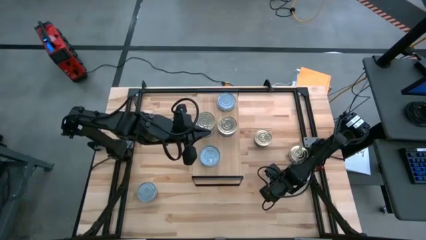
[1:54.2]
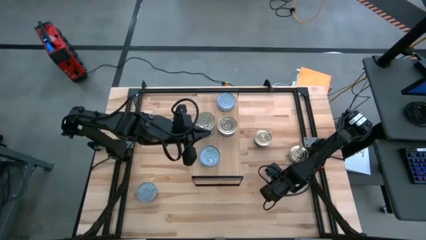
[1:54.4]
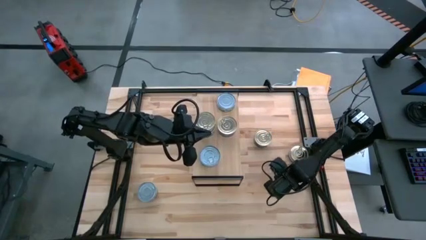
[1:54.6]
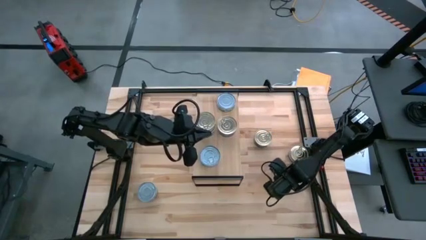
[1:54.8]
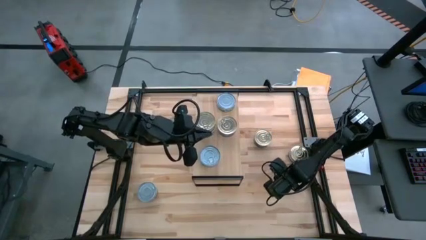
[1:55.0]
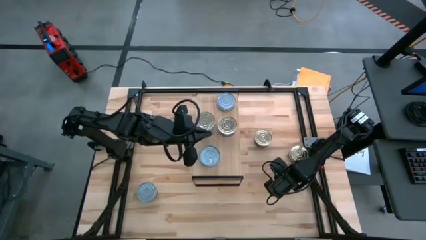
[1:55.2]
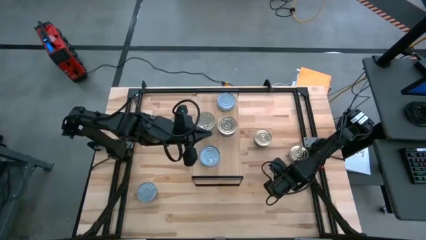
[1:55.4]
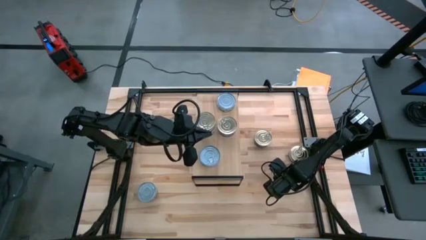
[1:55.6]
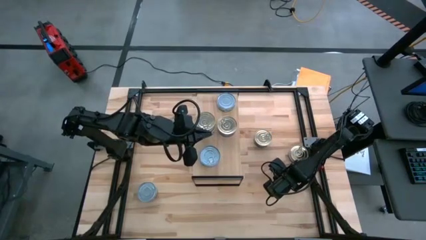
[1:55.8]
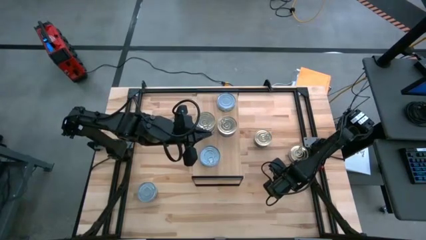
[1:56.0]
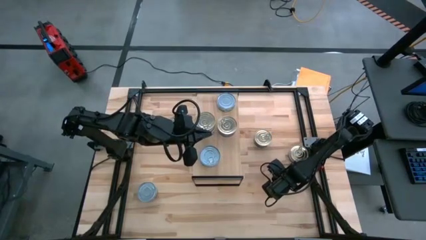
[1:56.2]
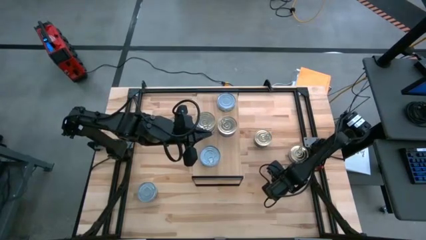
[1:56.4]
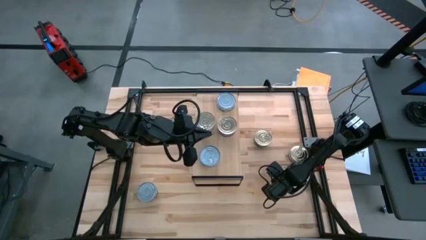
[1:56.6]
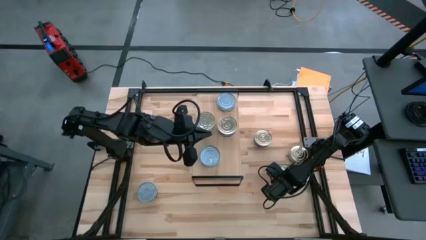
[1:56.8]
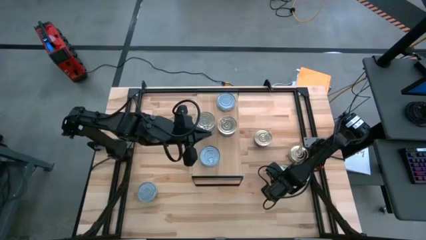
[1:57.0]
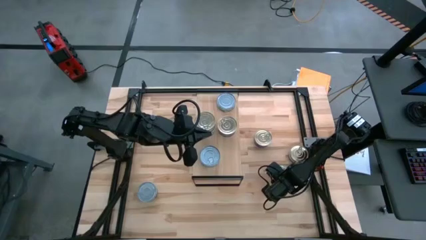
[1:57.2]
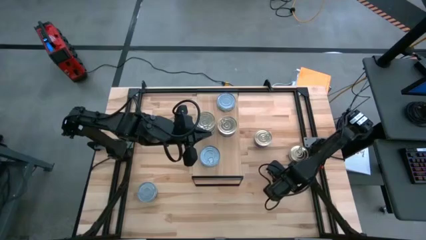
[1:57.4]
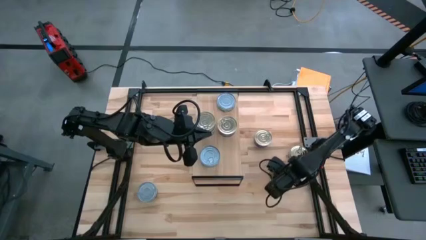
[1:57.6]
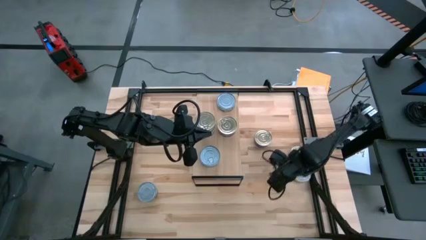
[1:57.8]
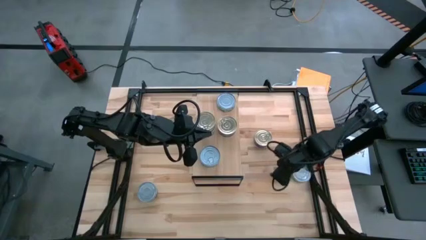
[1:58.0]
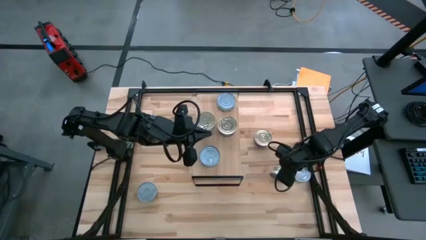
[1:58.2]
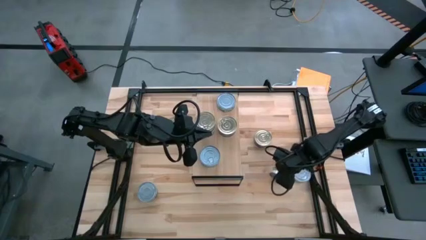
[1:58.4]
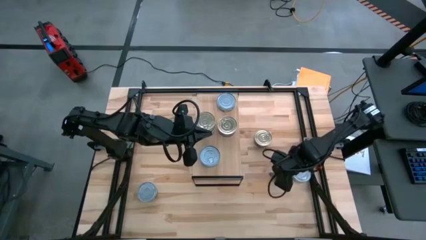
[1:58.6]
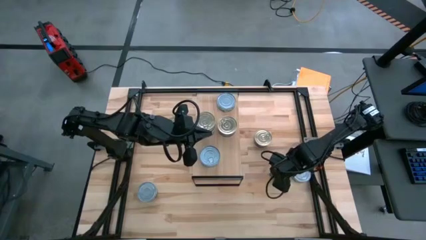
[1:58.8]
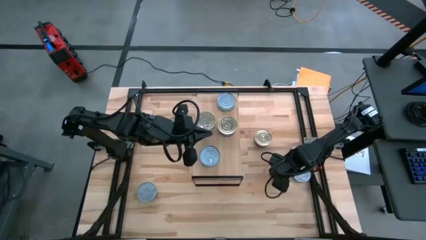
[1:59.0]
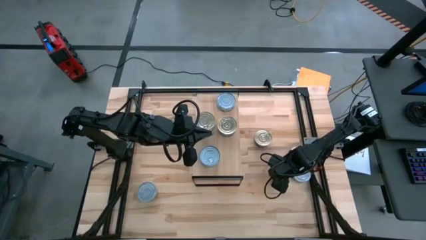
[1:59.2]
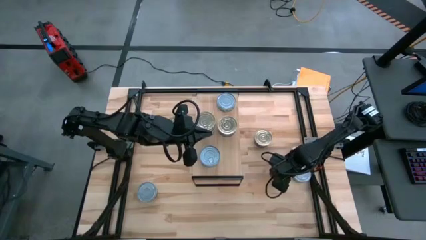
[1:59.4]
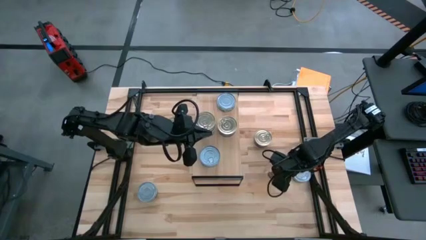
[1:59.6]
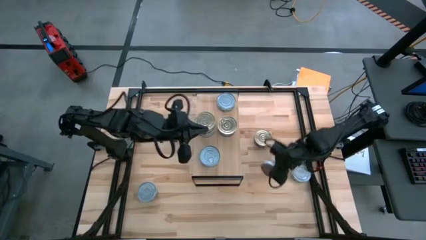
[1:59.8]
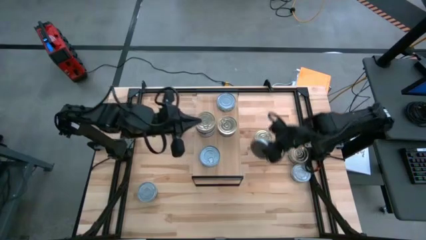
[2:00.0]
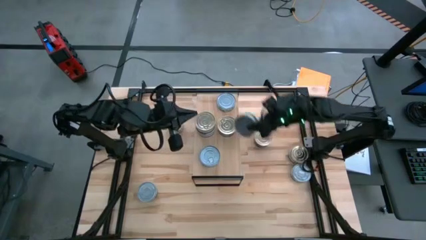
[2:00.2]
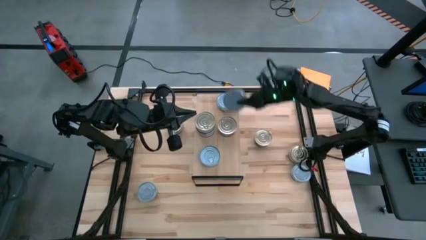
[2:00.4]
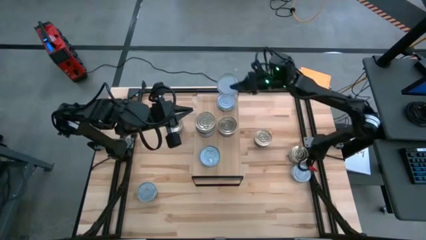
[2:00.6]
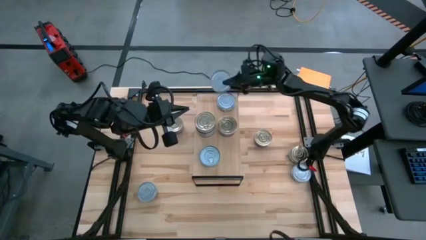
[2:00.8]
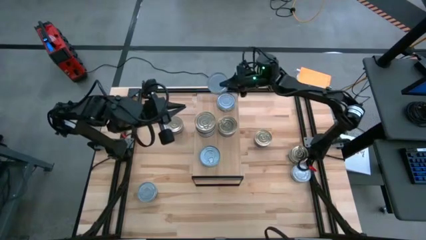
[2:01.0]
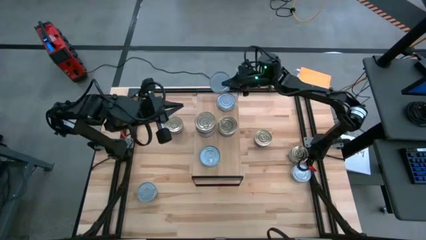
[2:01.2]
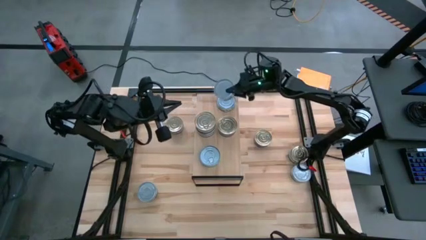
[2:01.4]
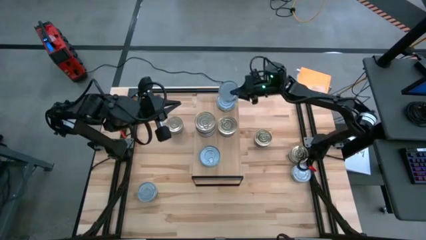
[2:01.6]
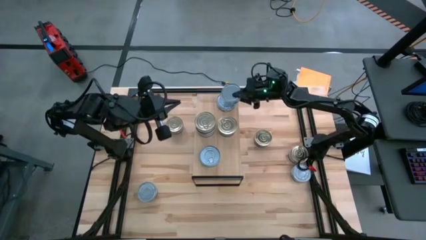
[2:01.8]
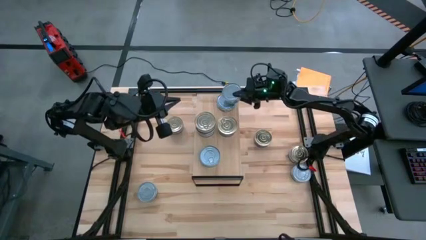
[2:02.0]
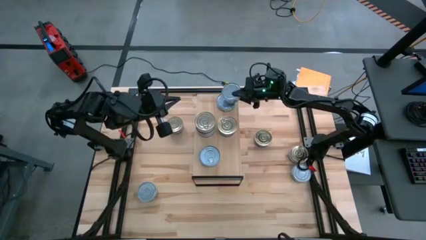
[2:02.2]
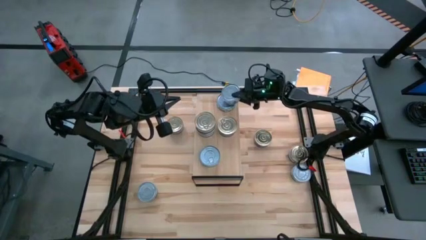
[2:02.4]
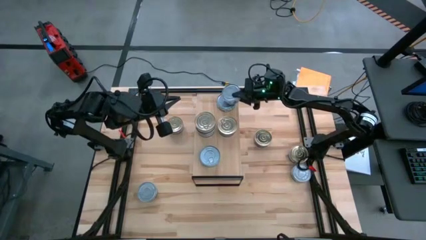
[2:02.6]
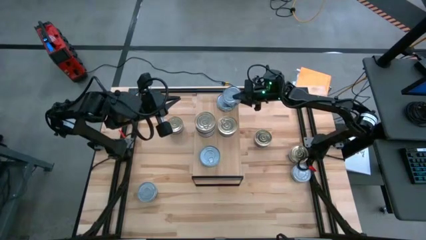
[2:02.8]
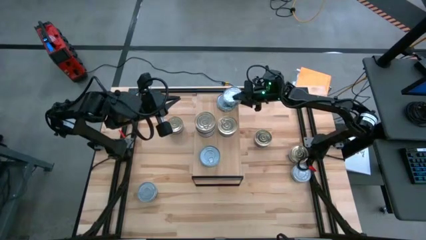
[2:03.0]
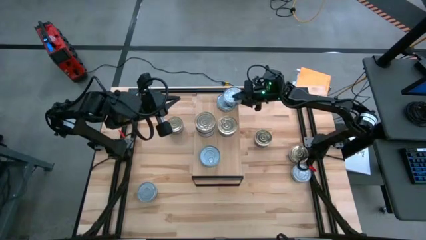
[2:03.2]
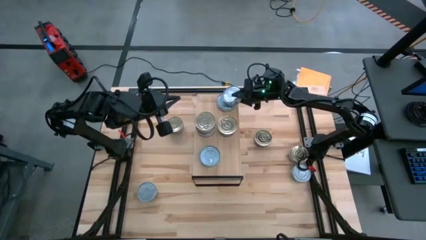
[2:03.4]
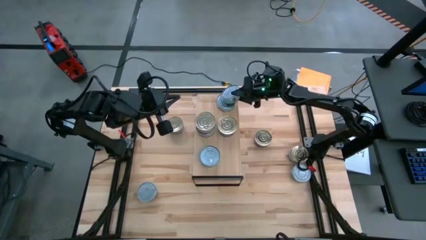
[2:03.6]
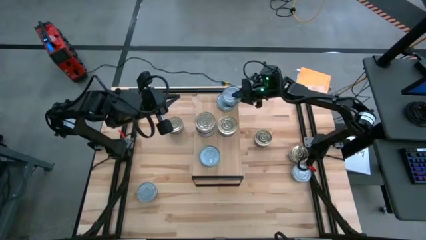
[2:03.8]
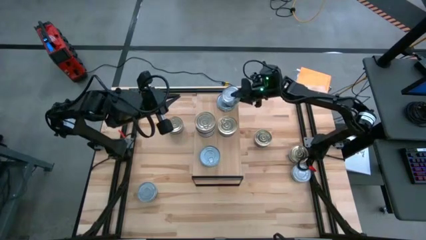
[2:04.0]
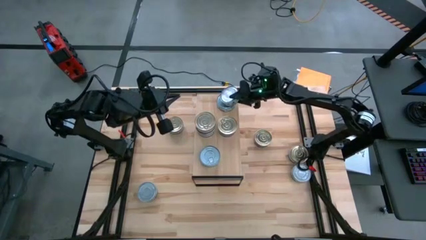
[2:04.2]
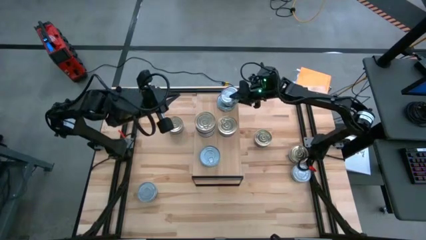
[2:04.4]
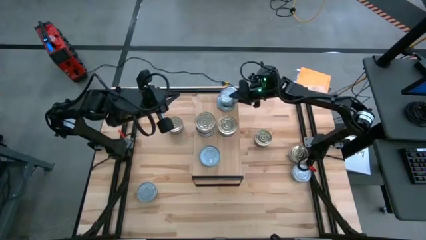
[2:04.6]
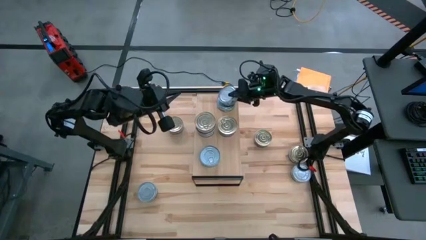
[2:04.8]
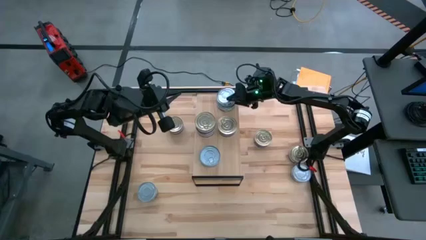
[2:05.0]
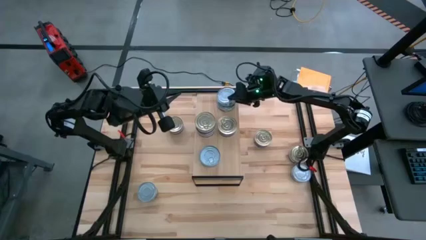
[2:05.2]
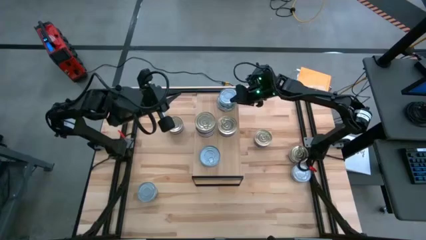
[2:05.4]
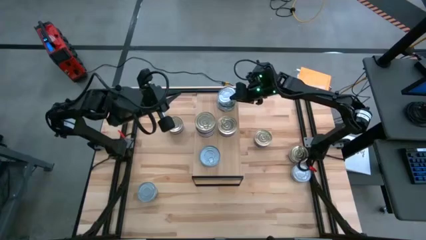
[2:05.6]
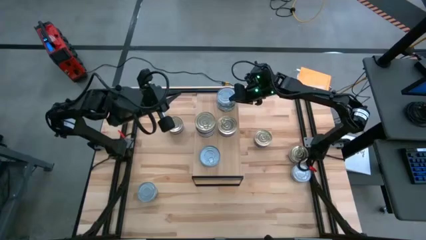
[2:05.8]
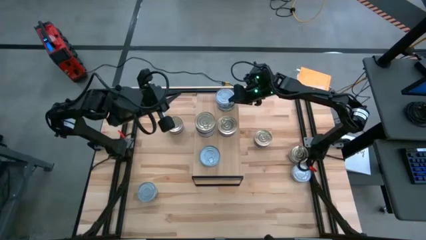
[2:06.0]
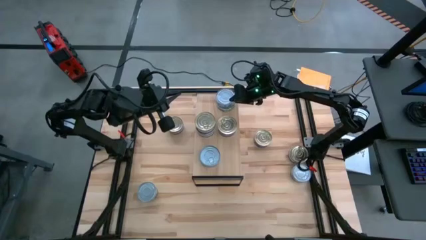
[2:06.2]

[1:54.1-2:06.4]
Task: Stack canned seafood by type on shelf
Stack the green tuna can on top of the green tuna can on the shelf
